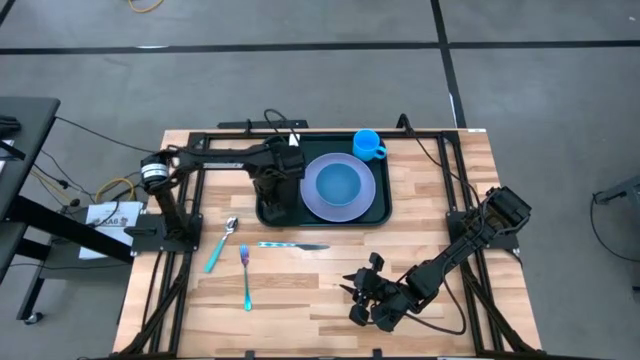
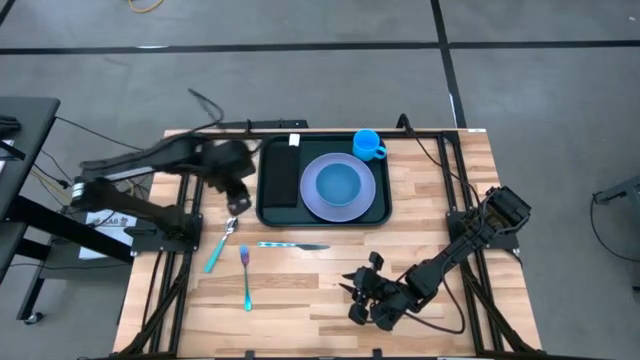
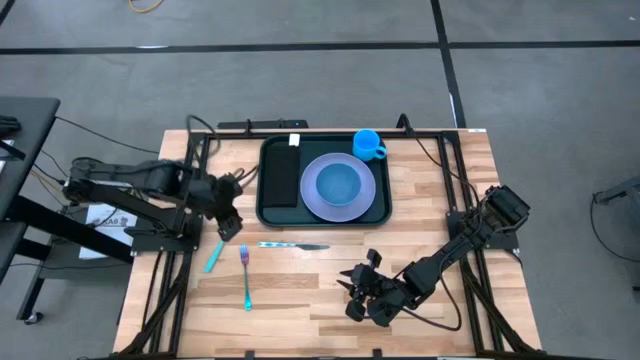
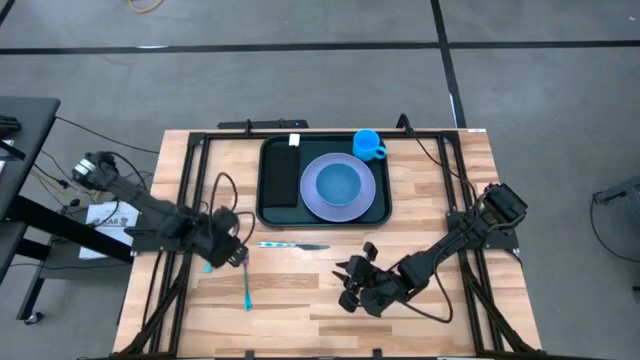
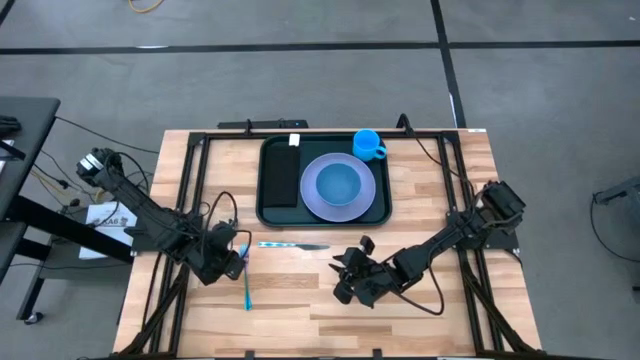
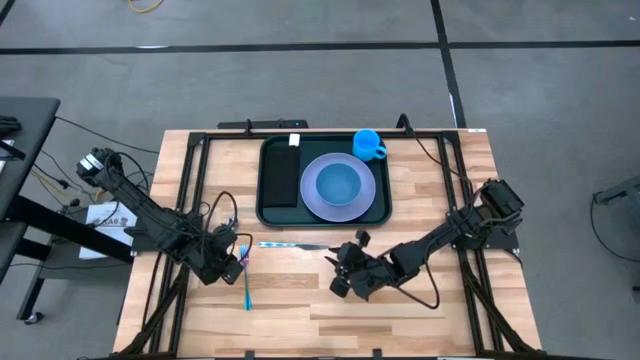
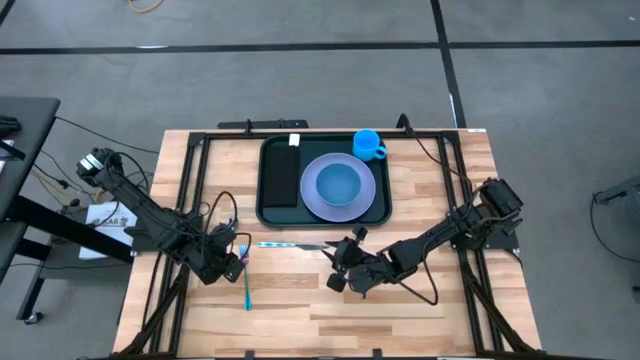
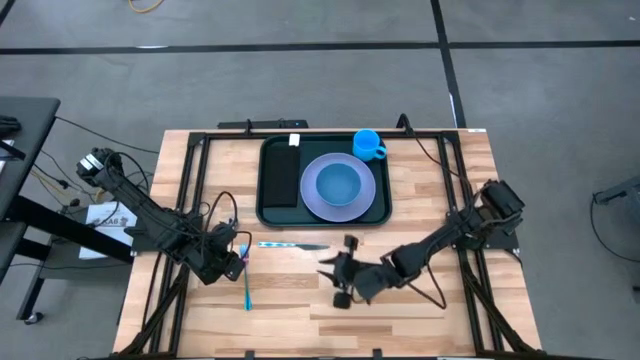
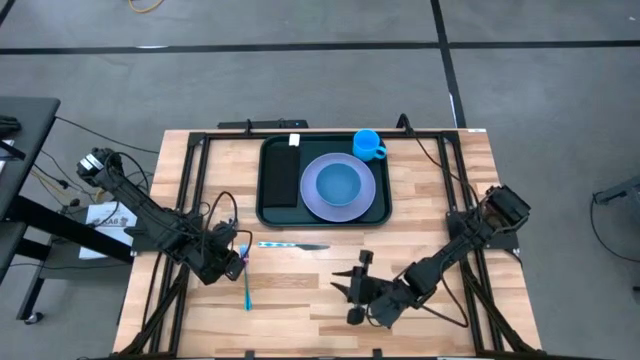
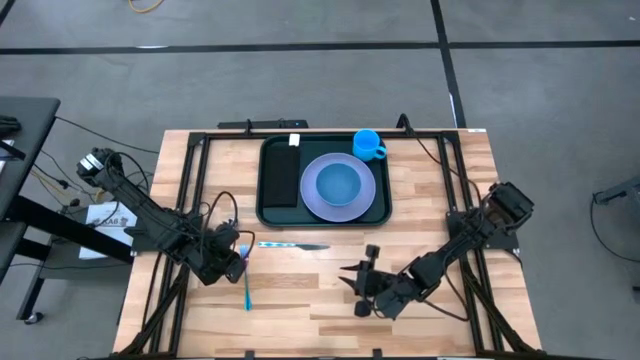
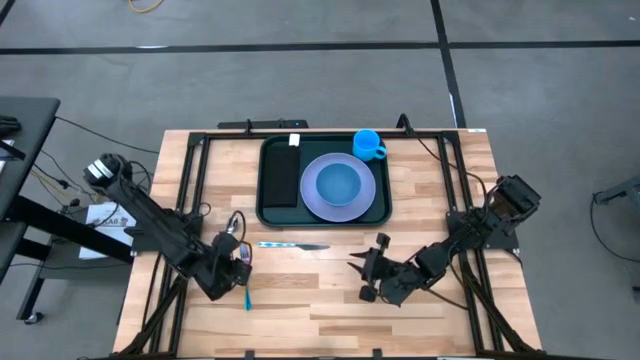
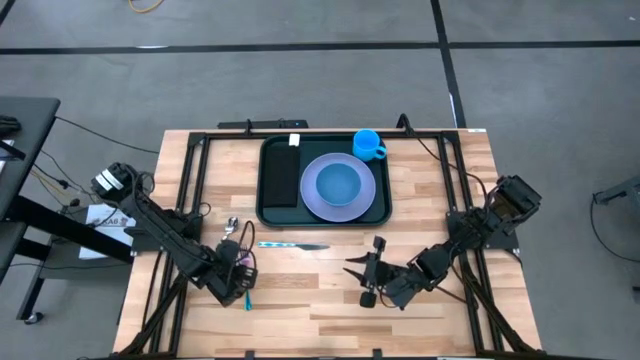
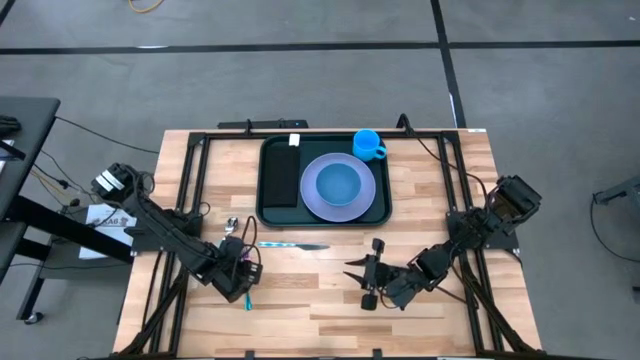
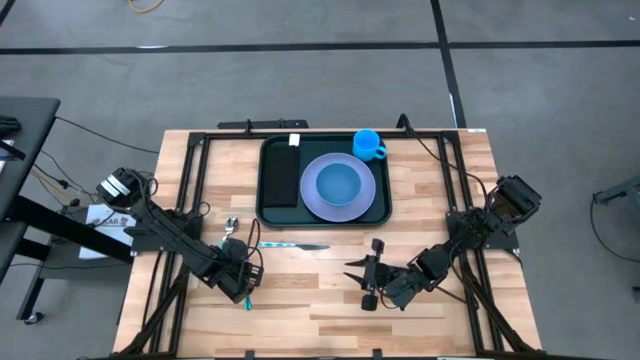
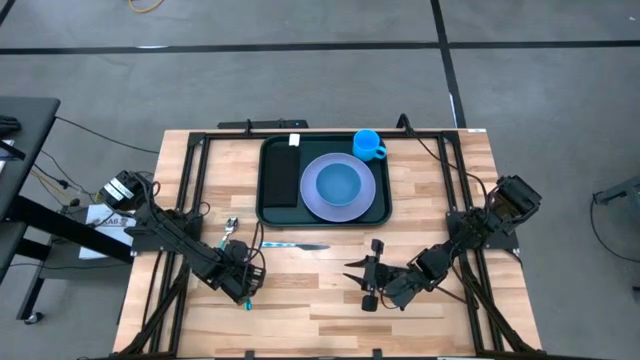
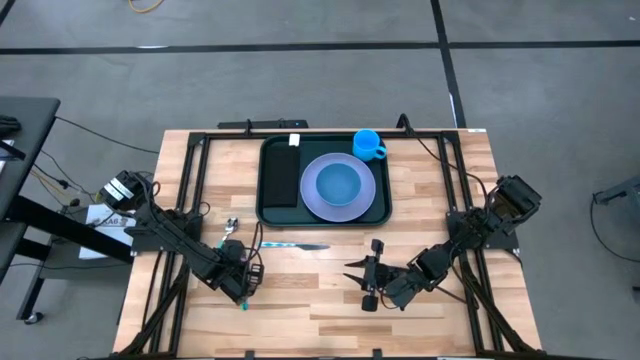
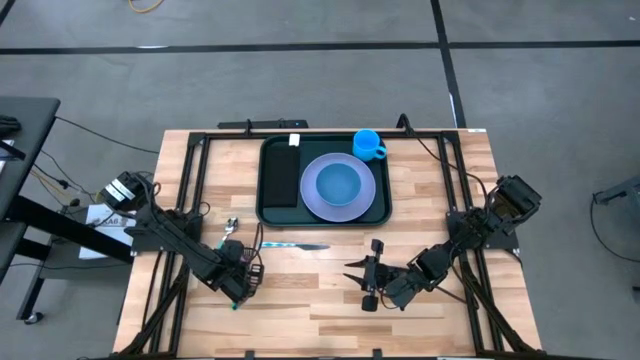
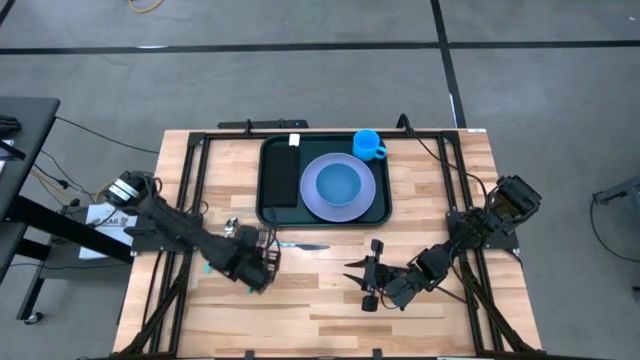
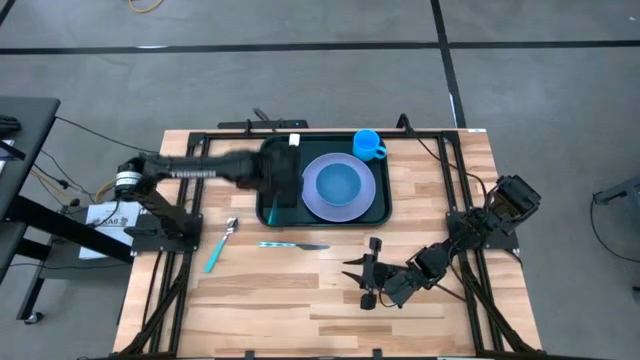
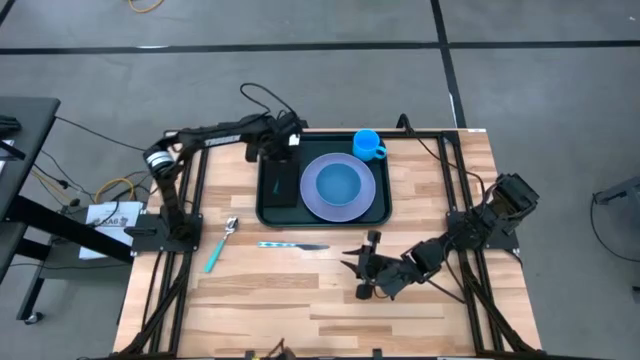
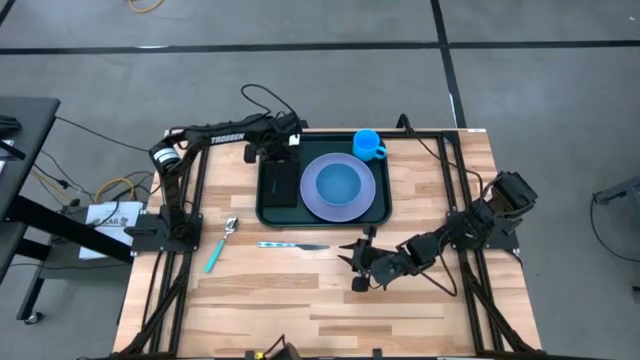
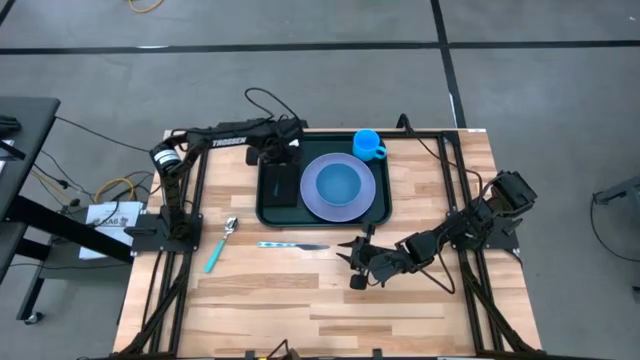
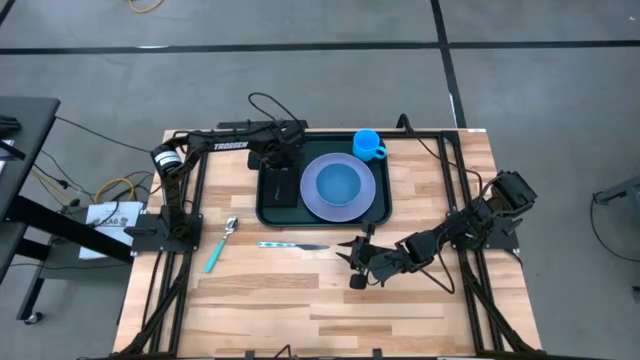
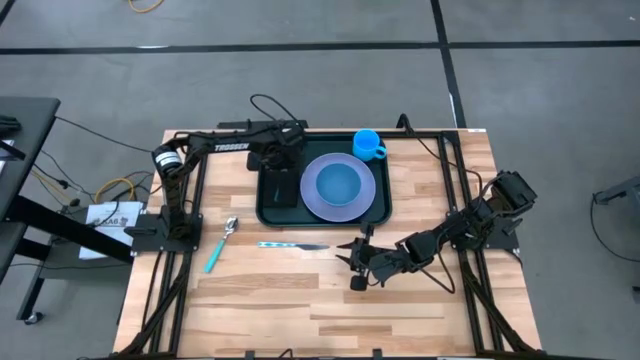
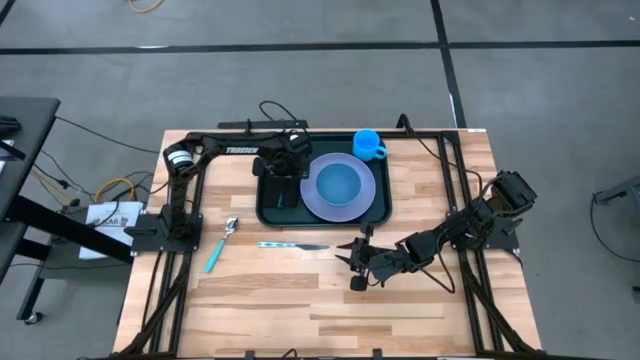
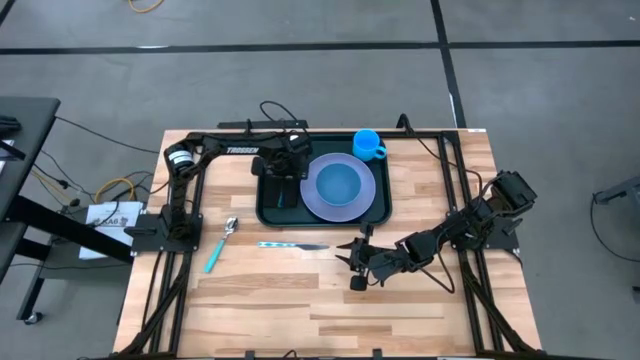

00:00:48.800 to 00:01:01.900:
Task: Set up tray
Put the blue fork on the black napkin

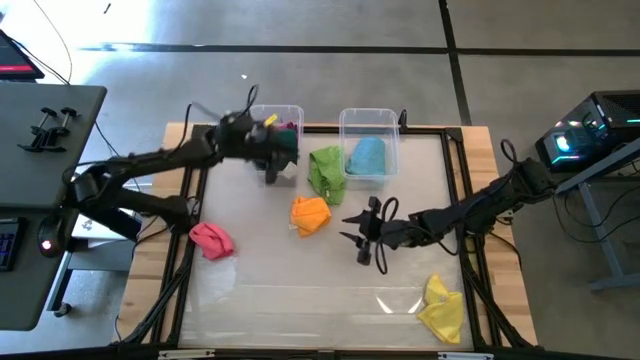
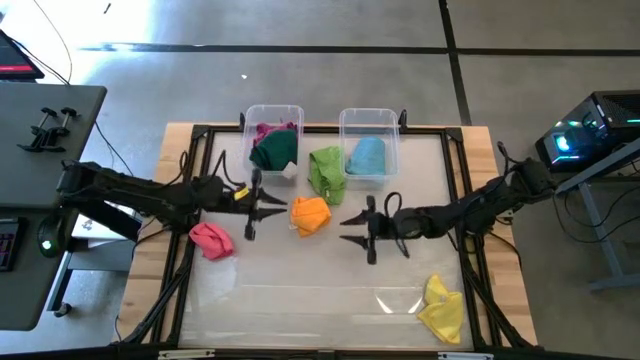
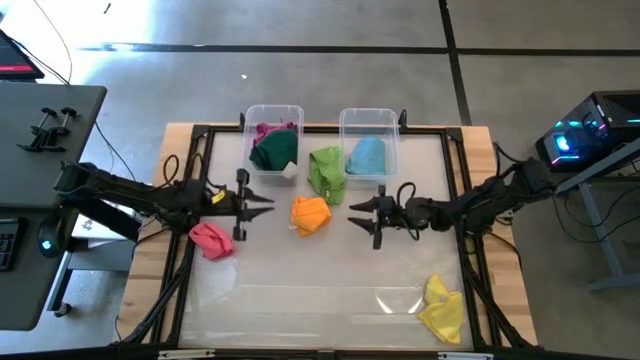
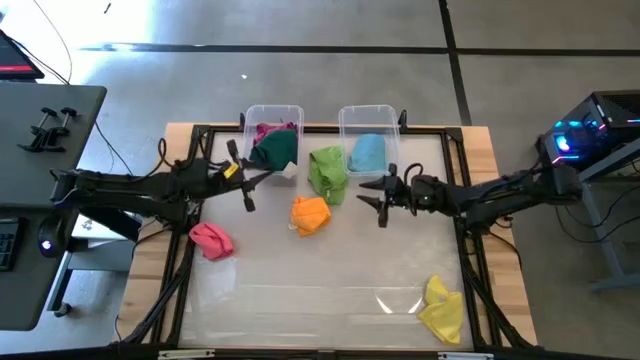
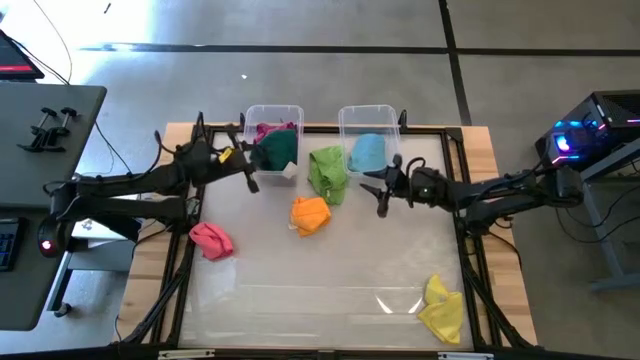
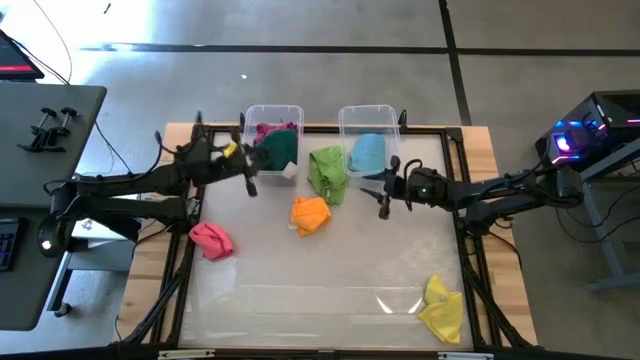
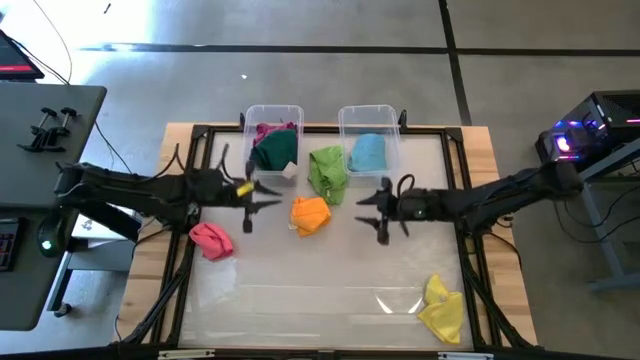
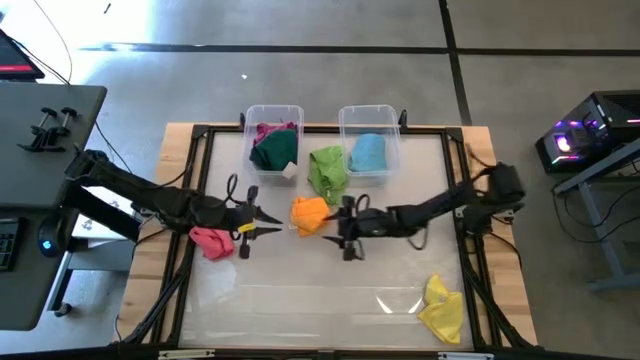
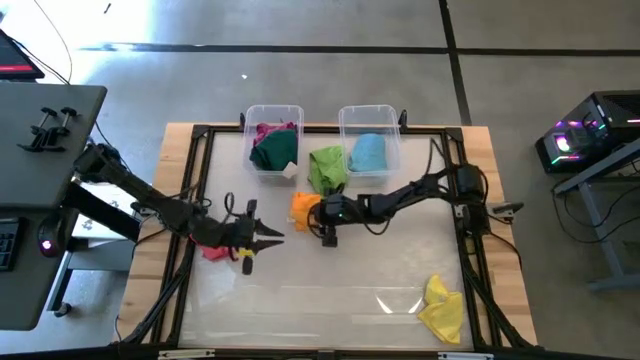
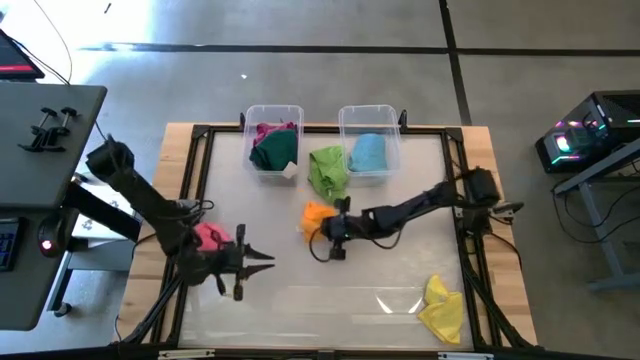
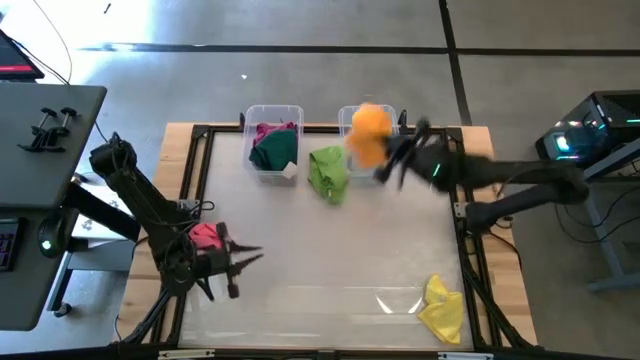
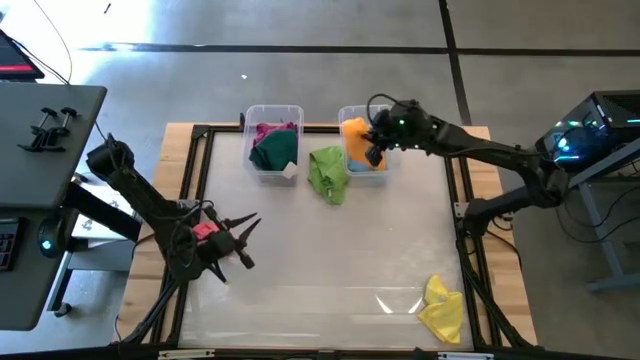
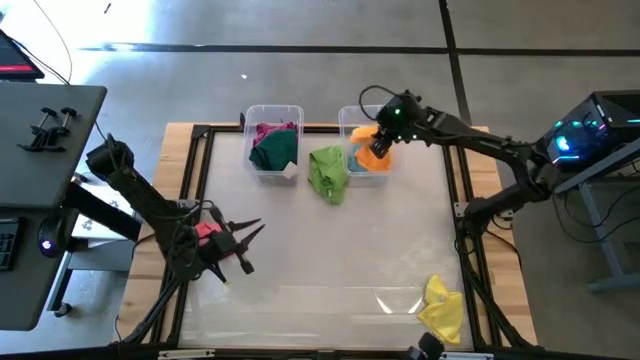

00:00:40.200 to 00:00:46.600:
Task: Sort towels by color in basket
Put the orange microfiber cloth into the right transparent bin

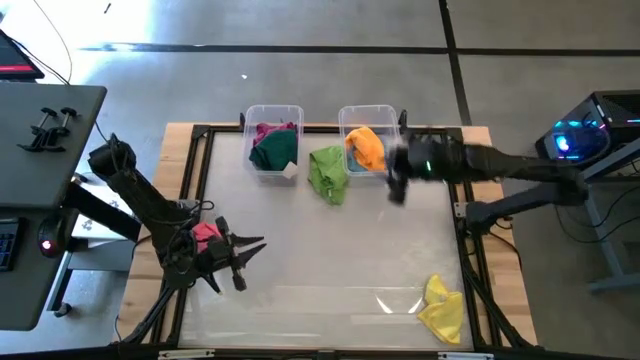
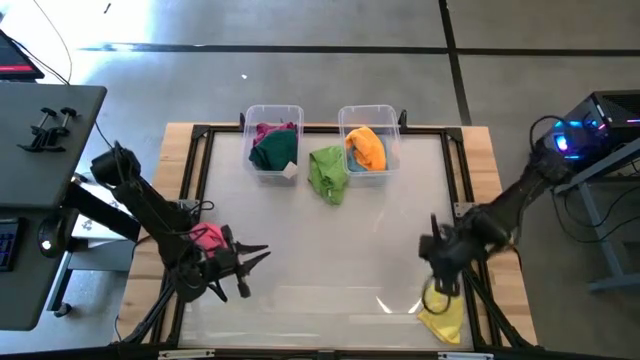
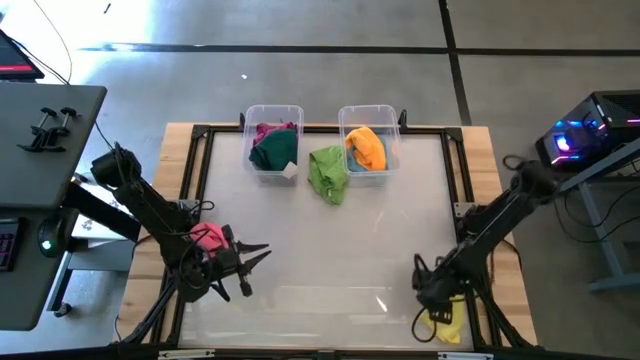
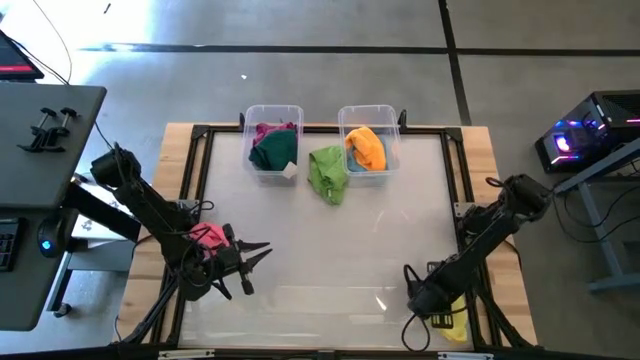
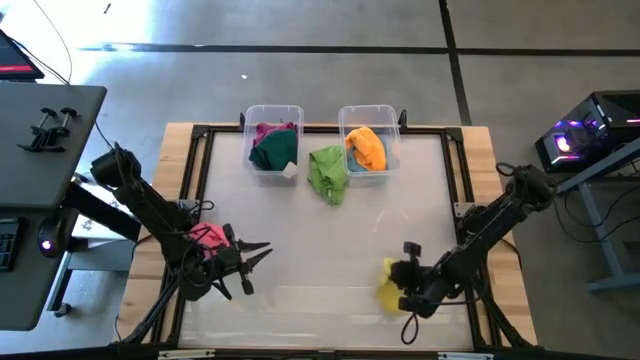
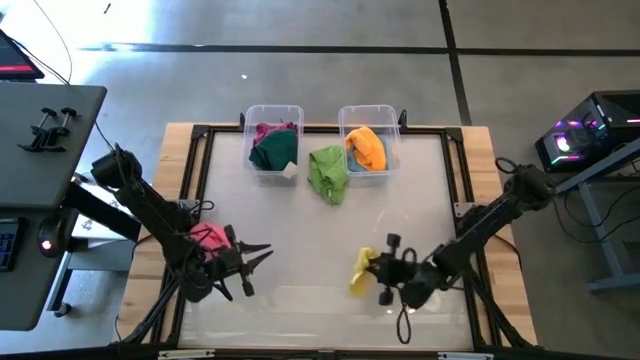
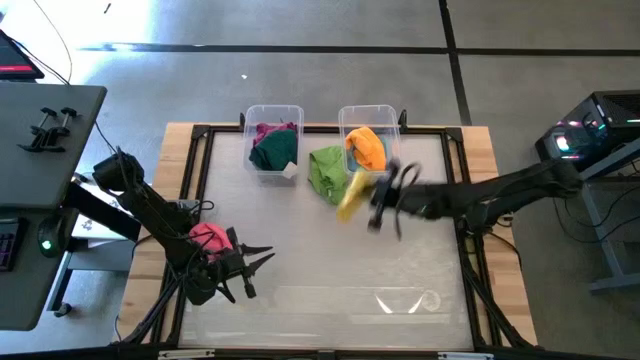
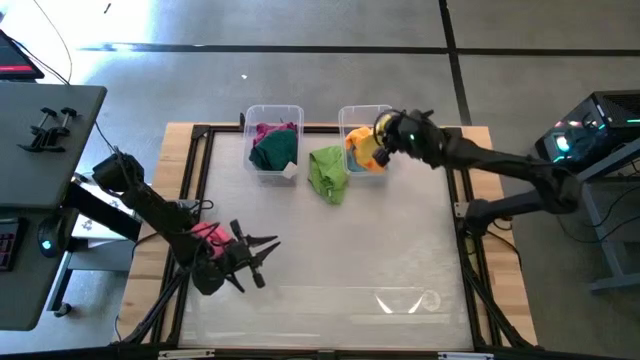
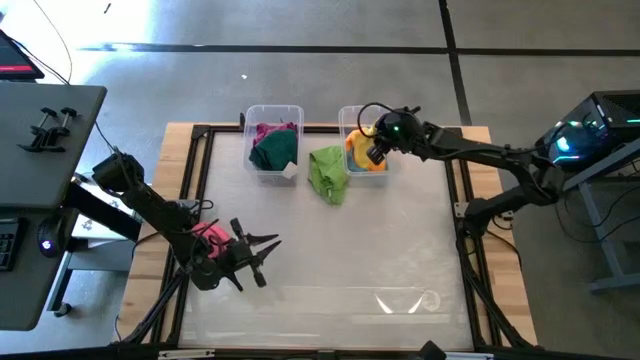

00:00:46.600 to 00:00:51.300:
Put the yellow microfiber cloth into the right transparent bin
